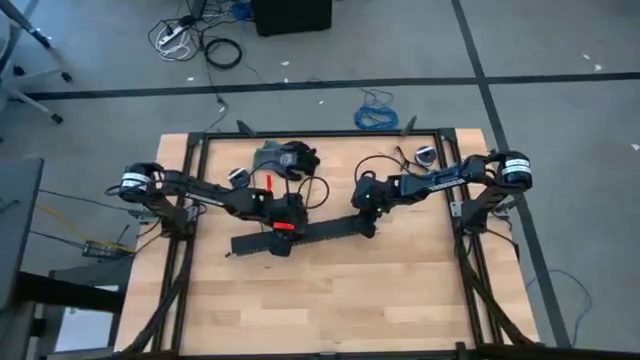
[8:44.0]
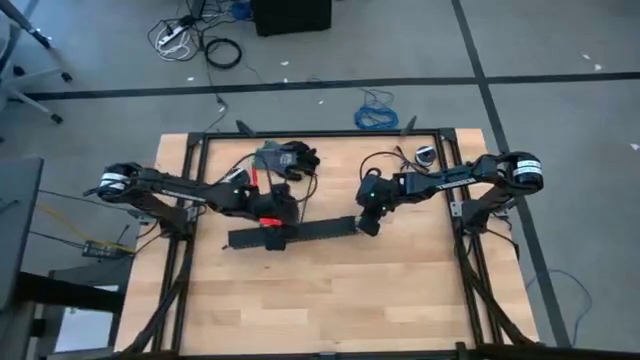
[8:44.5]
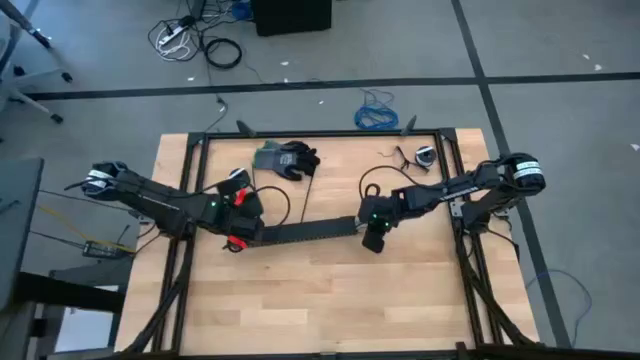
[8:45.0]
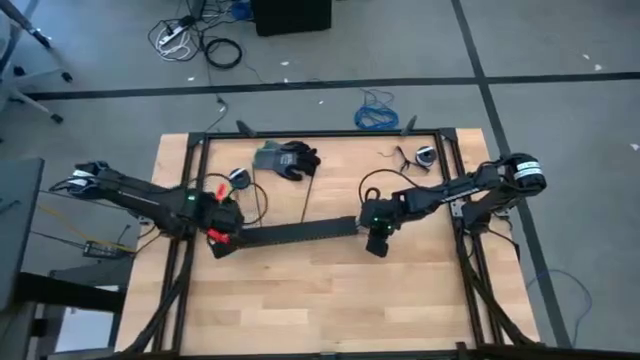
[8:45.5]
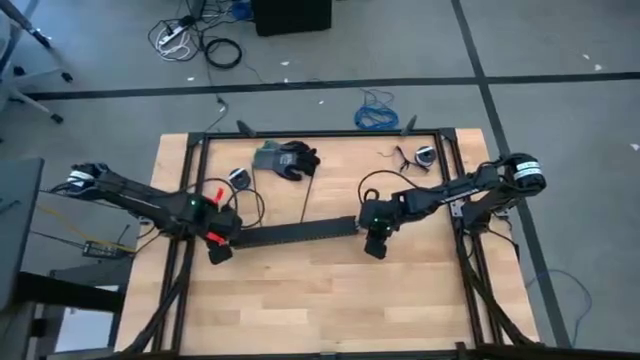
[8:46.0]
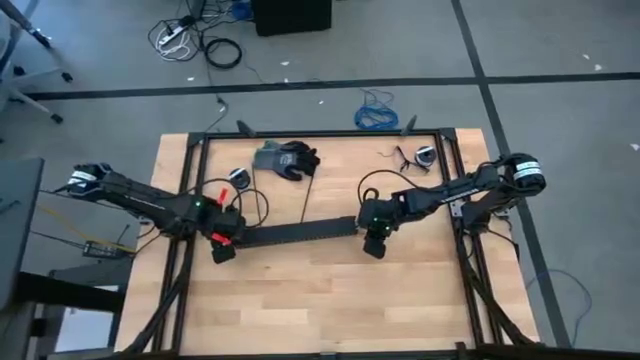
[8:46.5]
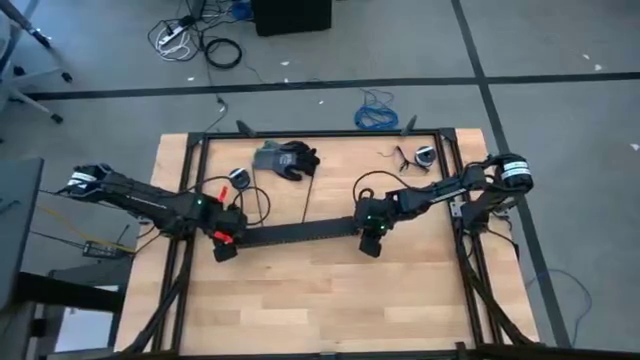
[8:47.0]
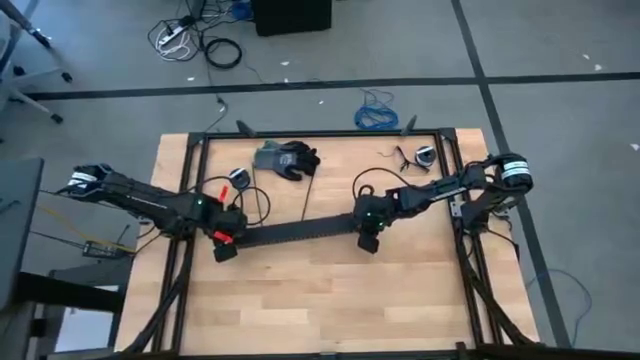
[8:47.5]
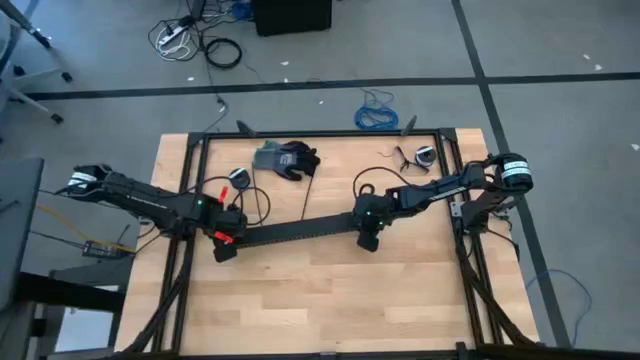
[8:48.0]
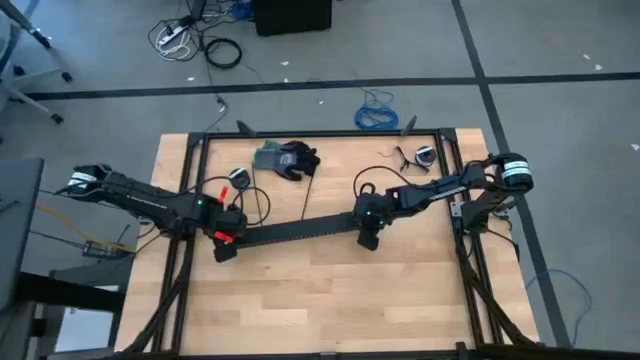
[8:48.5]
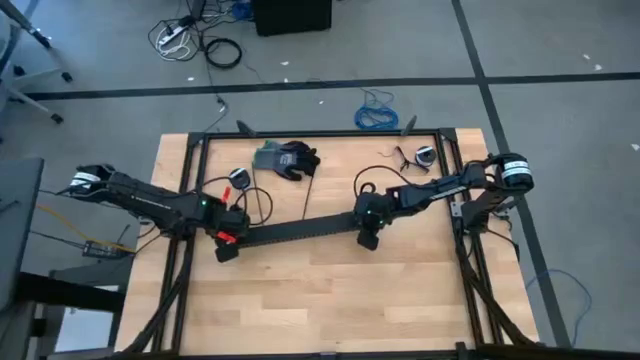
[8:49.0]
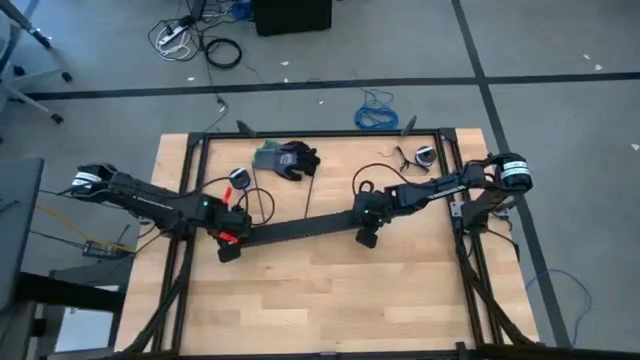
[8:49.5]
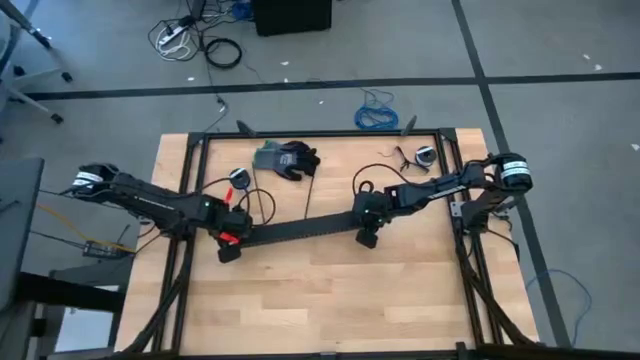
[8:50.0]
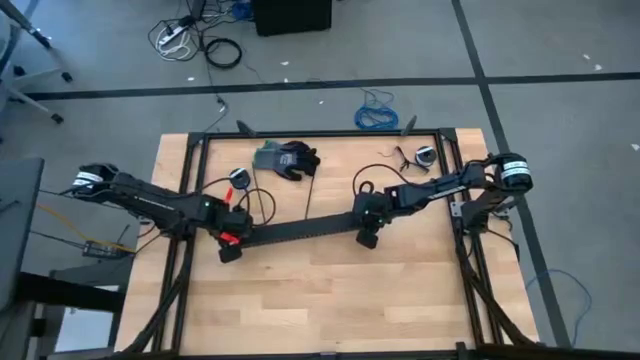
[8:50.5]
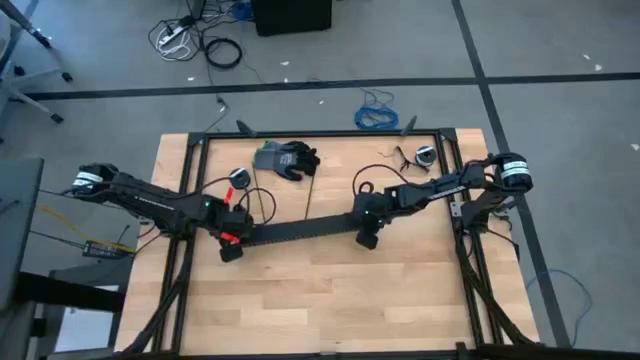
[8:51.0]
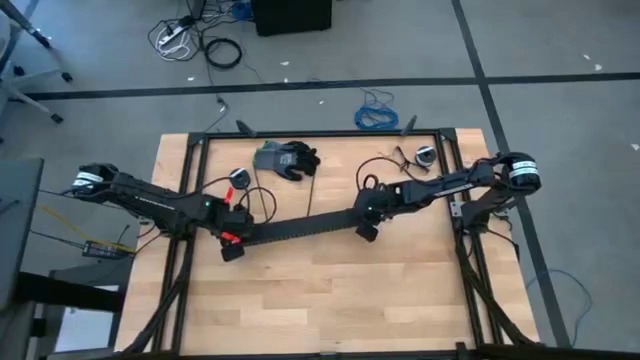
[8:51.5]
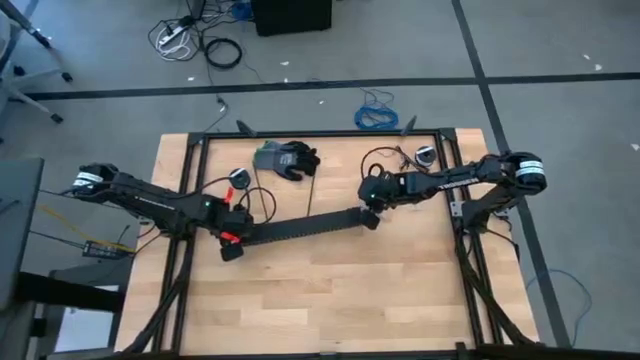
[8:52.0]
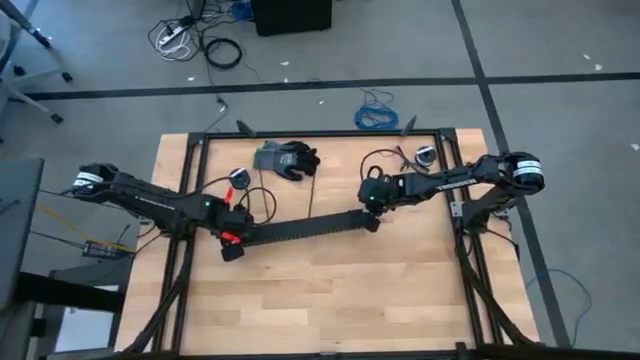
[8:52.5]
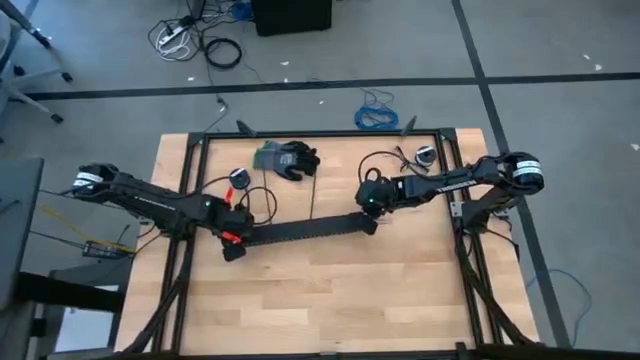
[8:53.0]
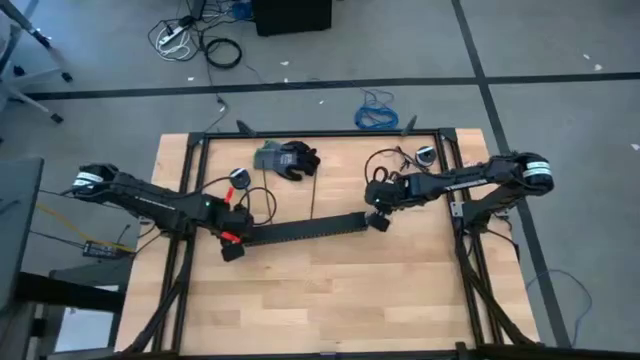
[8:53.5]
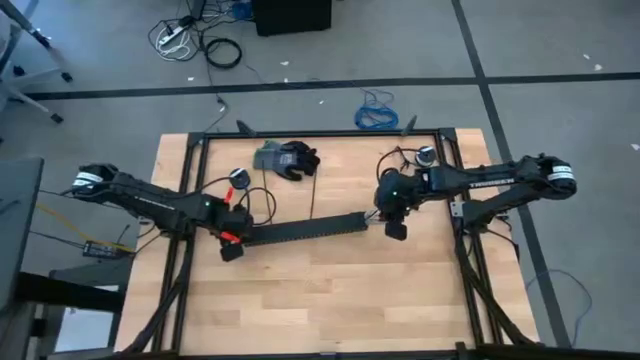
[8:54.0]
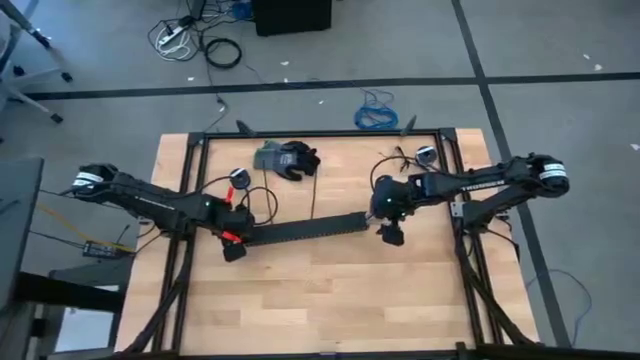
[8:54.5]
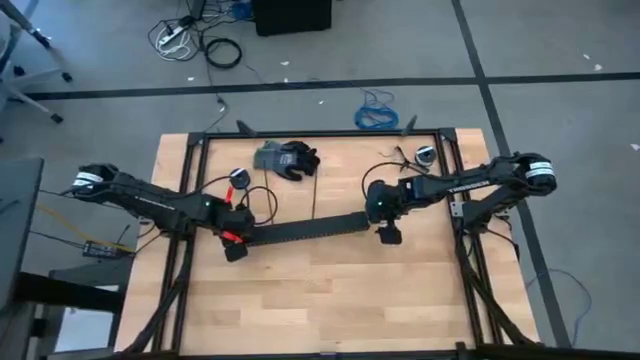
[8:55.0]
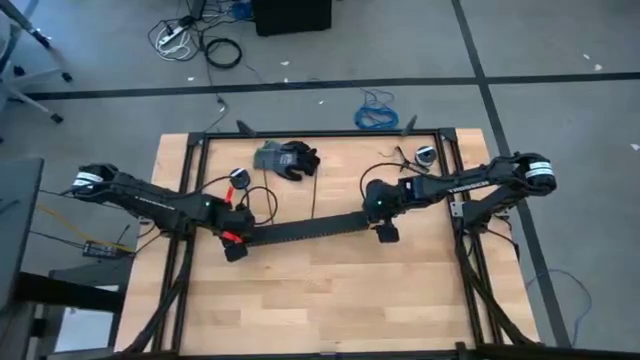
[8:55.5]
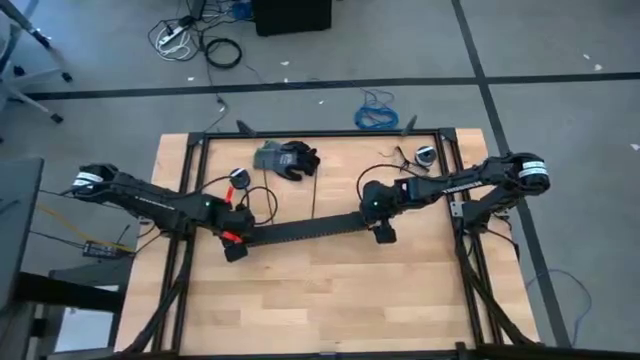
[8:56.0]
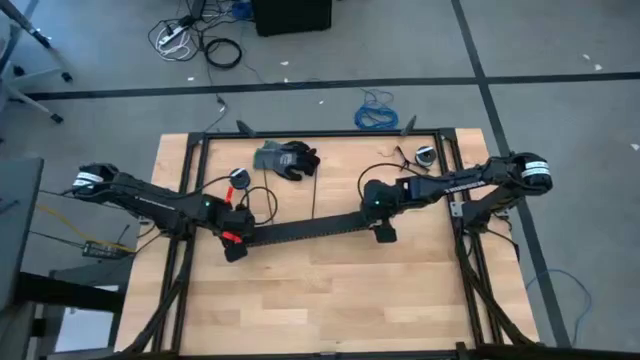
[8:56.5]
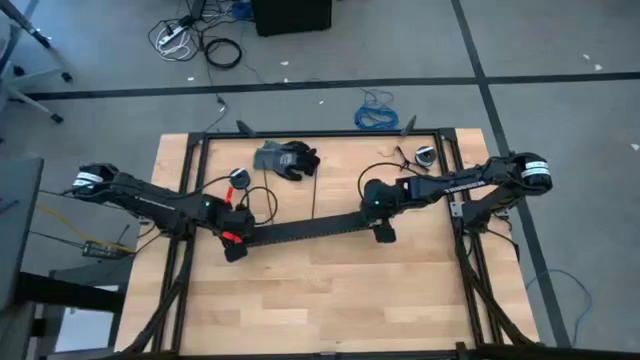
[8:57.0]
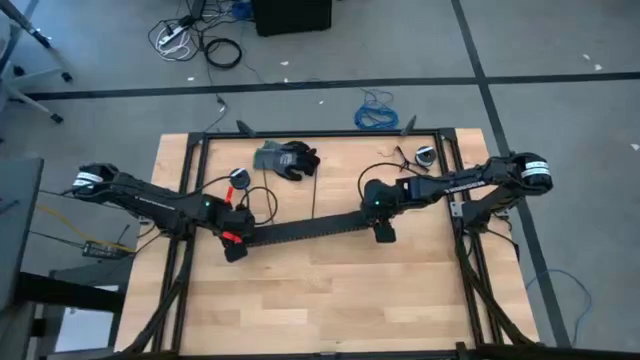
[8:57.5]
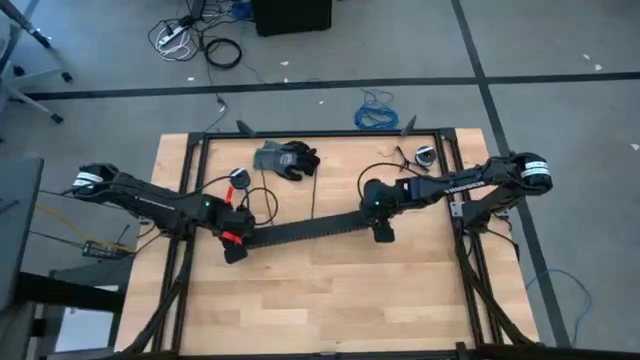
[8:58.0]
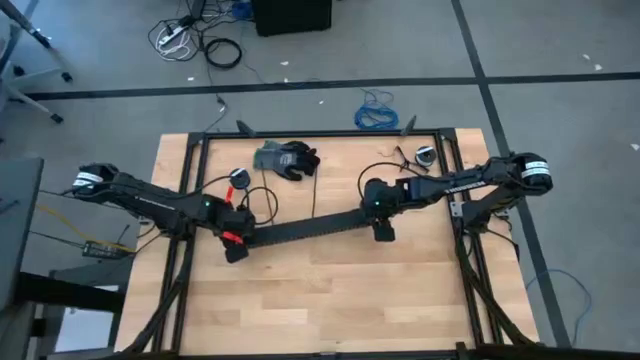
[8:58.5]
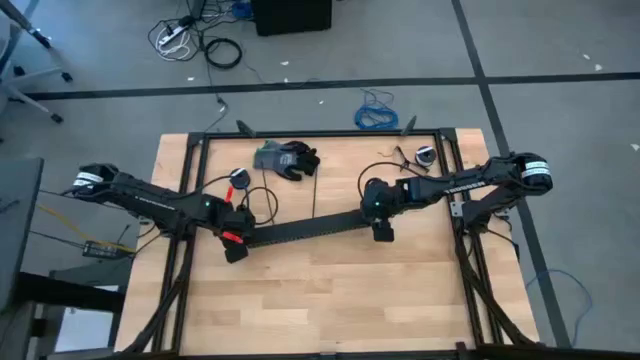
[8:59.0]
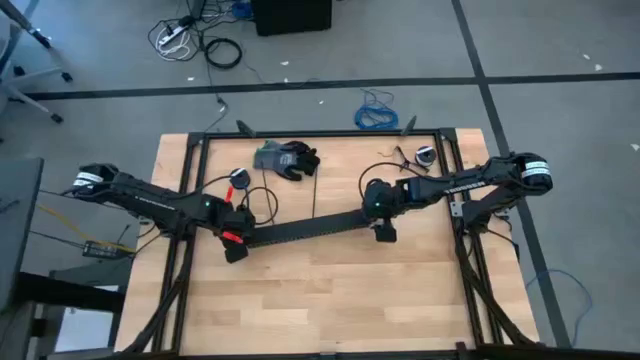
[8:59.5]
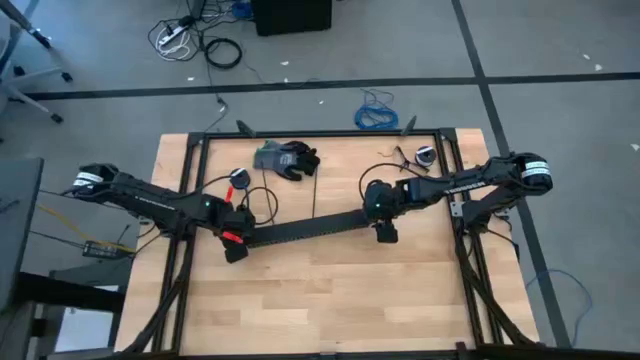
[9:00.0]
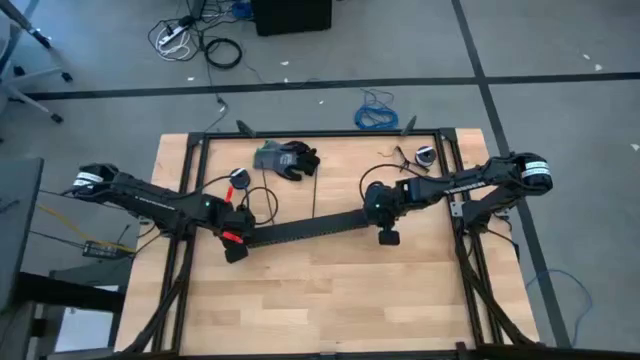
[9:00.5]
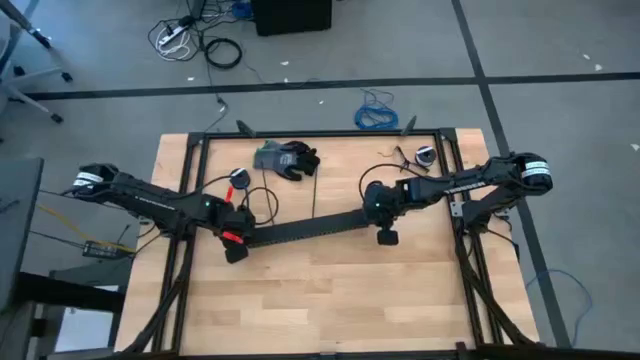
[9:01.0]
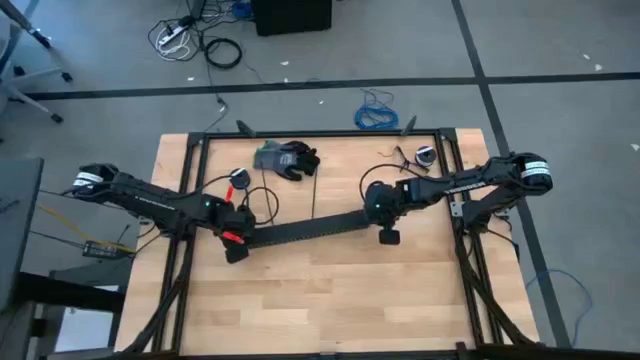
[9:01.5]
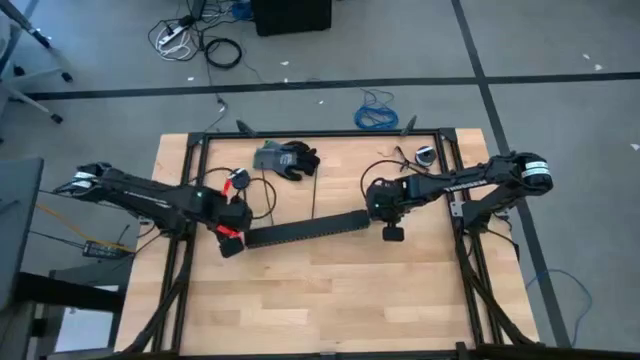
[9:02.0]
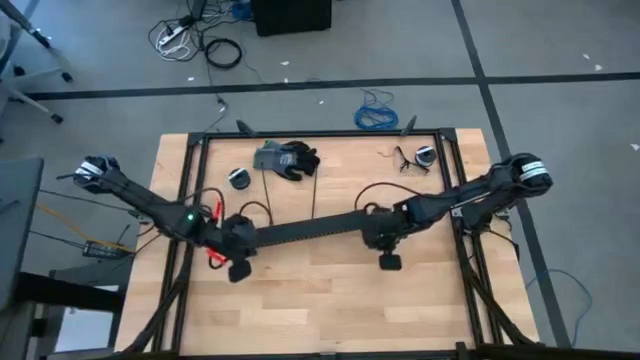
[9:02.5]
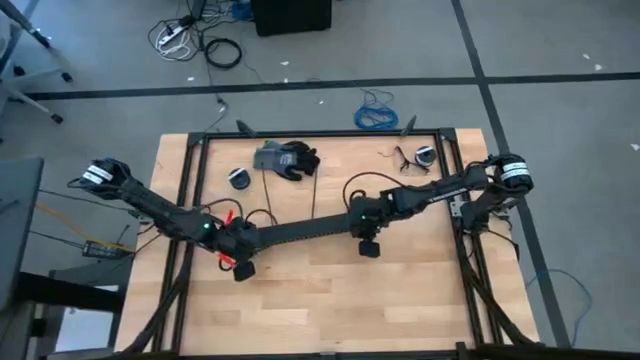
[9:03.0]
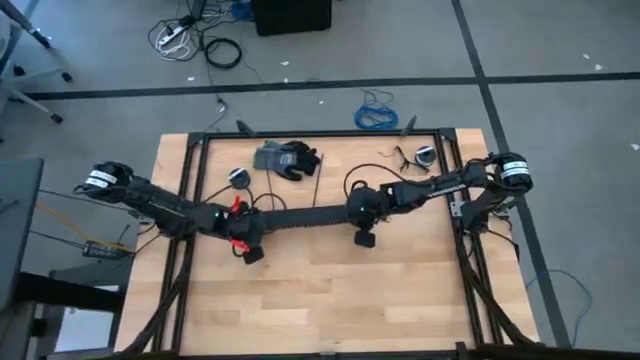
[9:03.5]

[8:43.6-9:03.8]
Task: Ziptie cables
Close the black cable duct cover

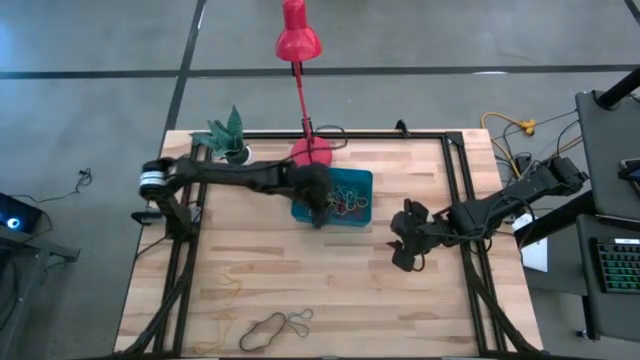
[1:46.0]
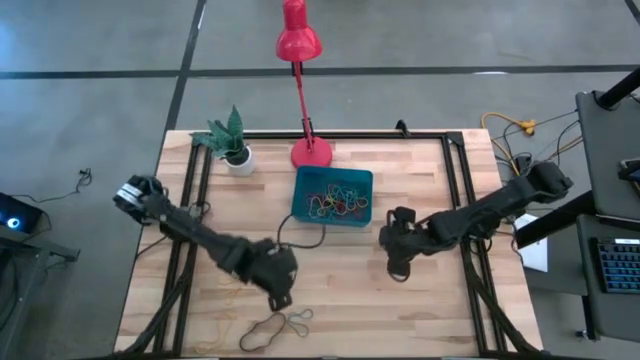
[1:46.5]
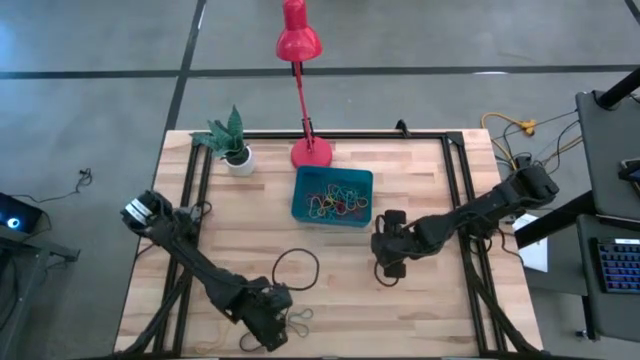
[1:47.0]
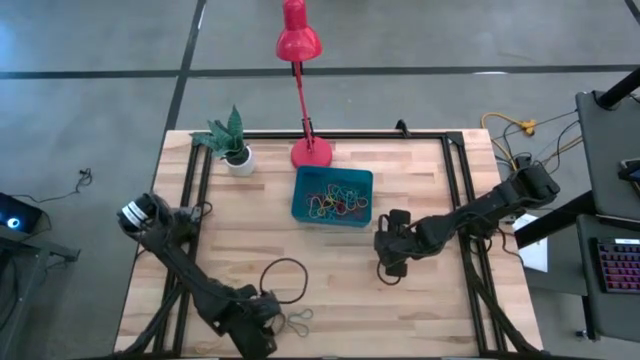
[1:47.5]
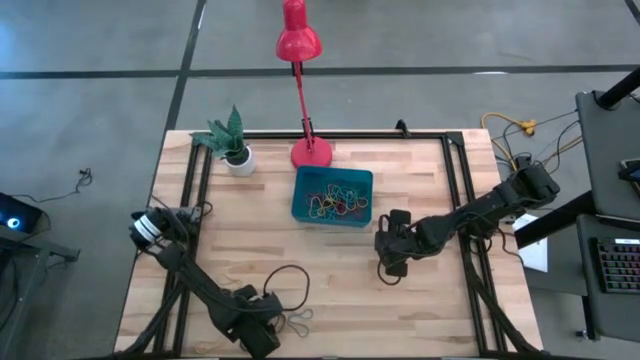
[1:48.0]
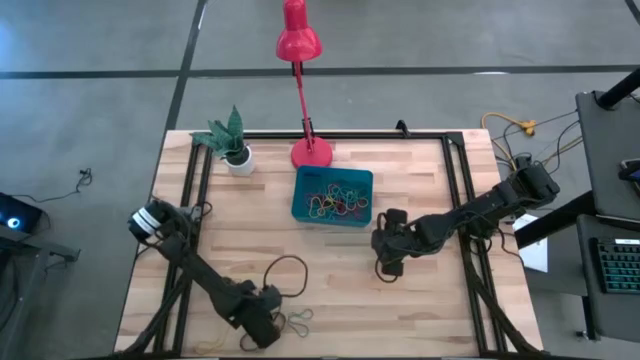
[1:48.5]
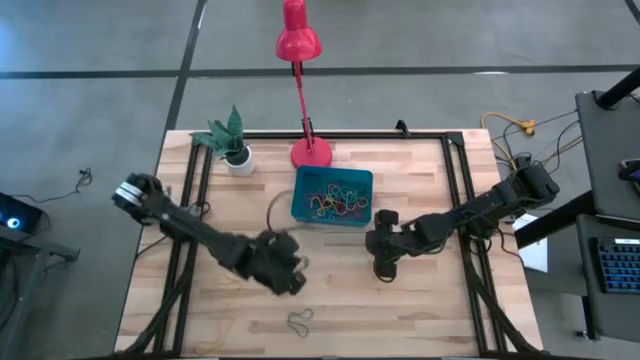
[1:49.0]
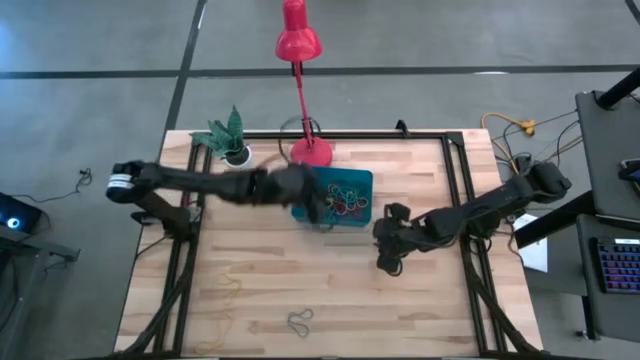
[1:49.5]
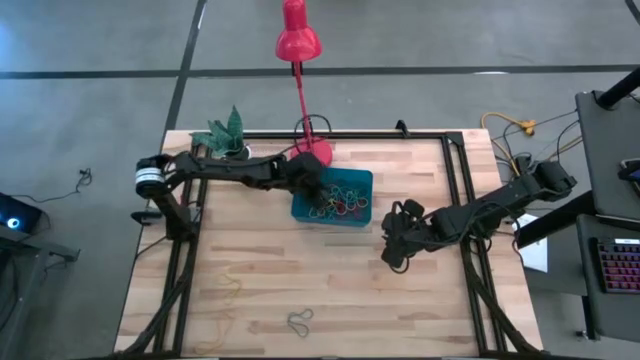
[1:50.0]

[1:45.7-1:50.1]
Task: Pick and place rubber bands into bin
Put the black rubber band into the blue bin
